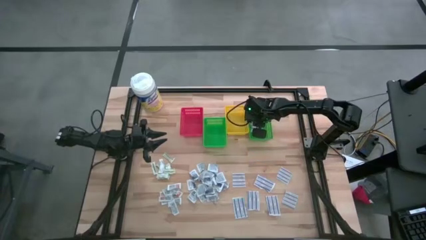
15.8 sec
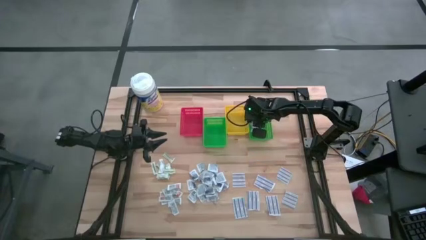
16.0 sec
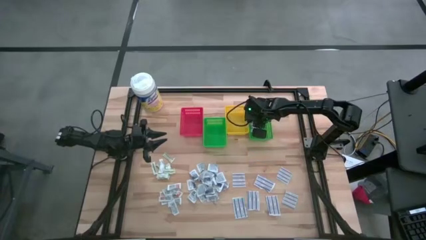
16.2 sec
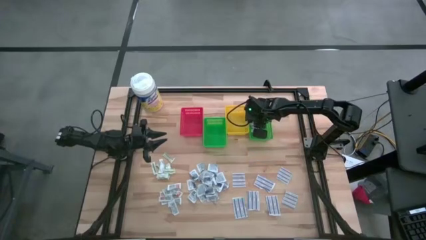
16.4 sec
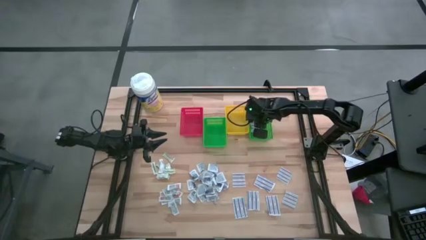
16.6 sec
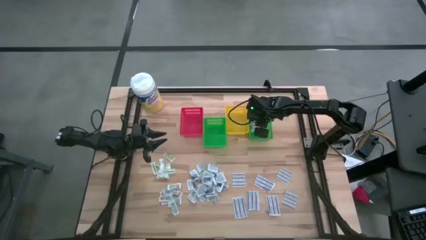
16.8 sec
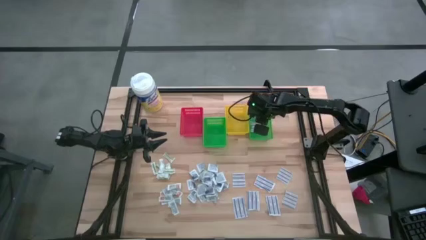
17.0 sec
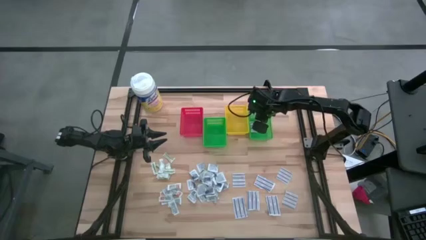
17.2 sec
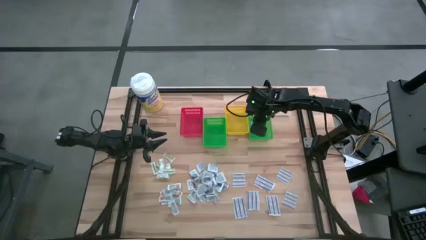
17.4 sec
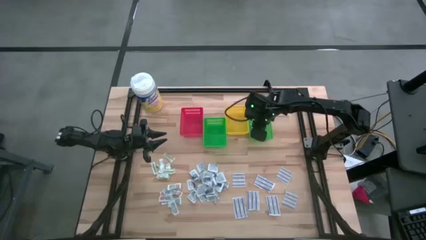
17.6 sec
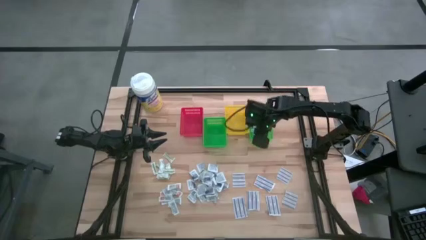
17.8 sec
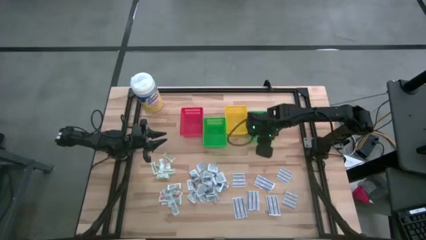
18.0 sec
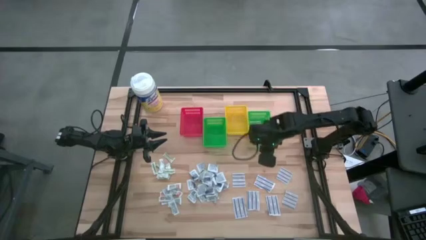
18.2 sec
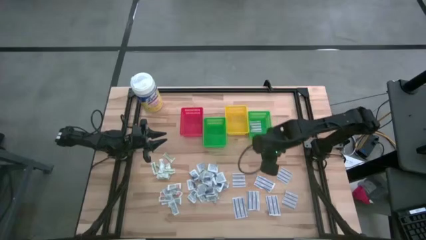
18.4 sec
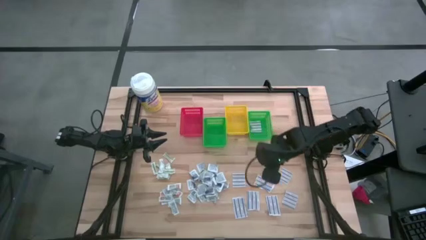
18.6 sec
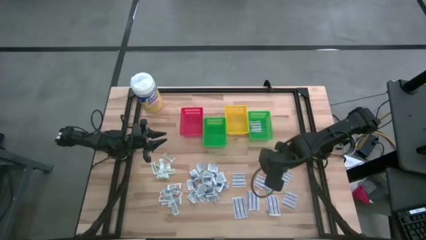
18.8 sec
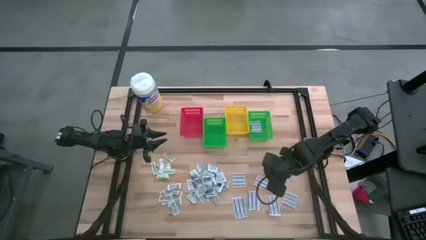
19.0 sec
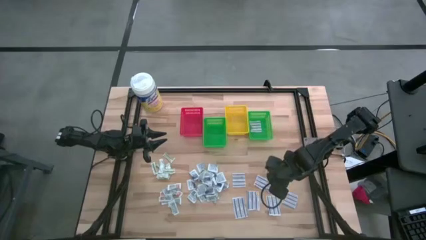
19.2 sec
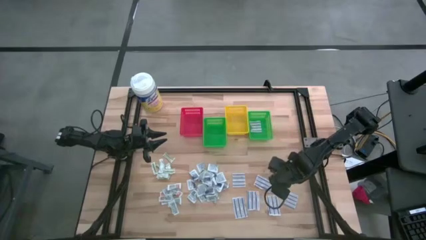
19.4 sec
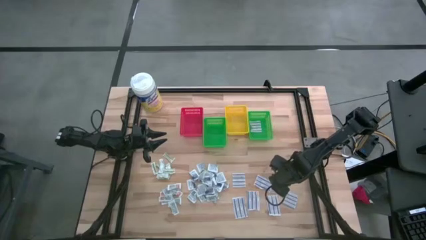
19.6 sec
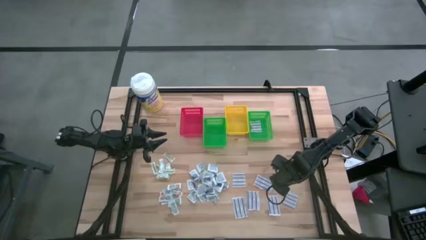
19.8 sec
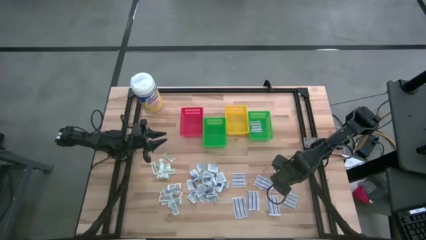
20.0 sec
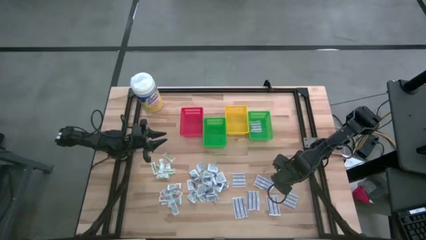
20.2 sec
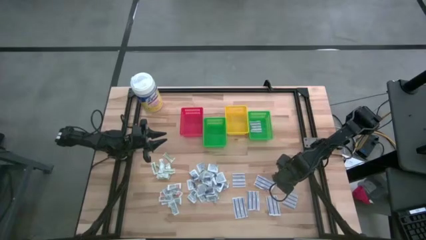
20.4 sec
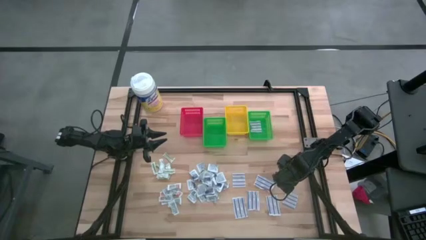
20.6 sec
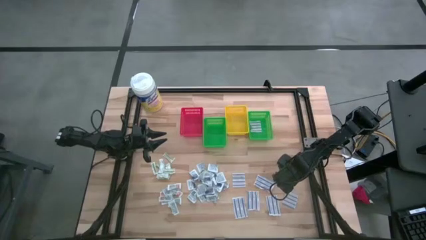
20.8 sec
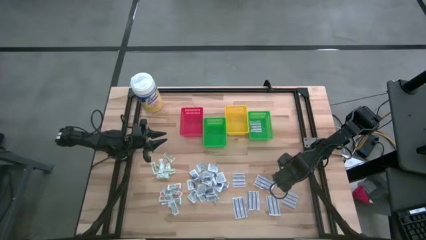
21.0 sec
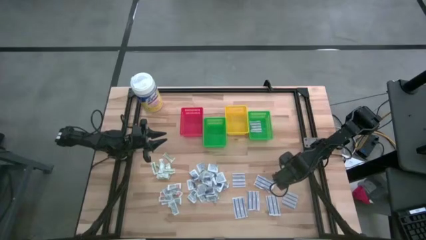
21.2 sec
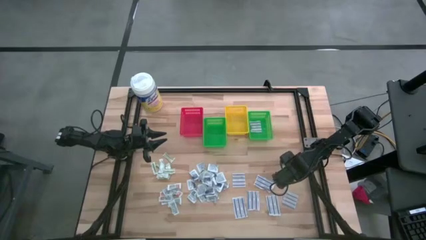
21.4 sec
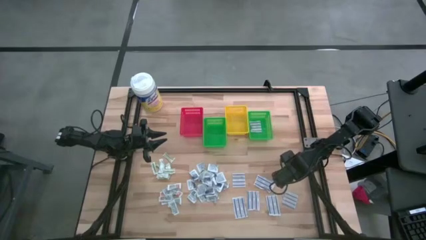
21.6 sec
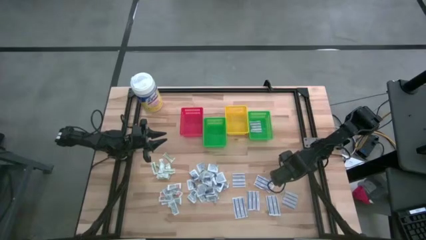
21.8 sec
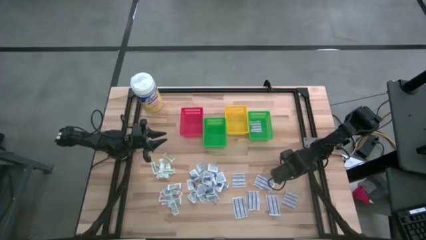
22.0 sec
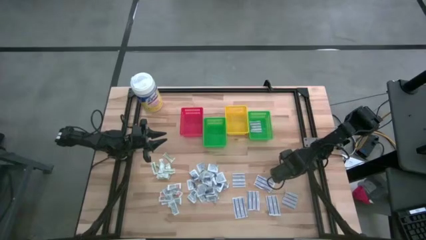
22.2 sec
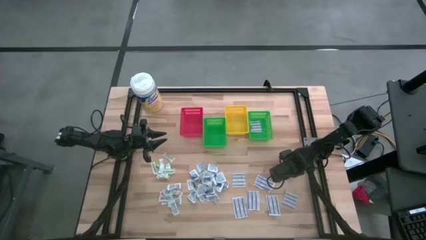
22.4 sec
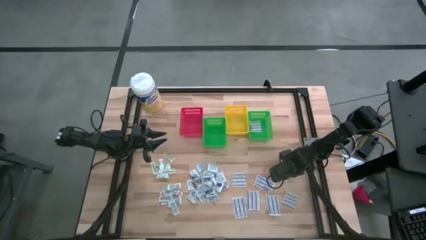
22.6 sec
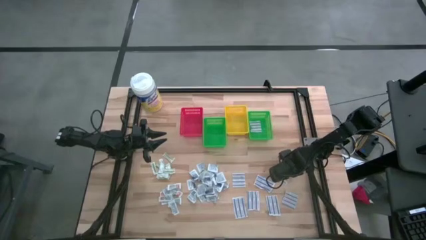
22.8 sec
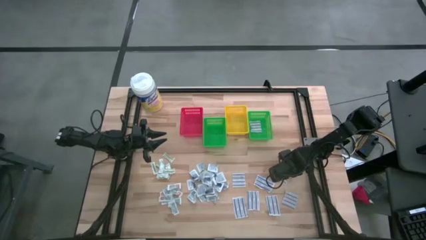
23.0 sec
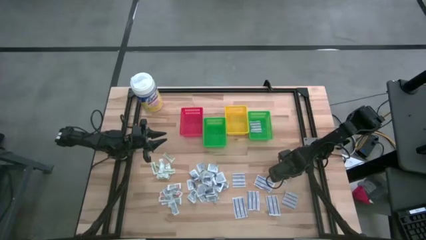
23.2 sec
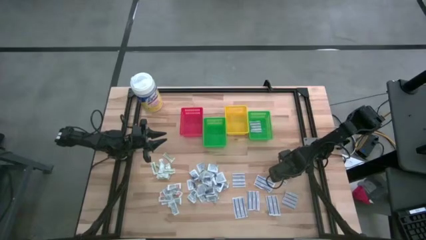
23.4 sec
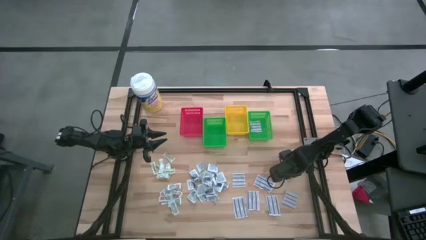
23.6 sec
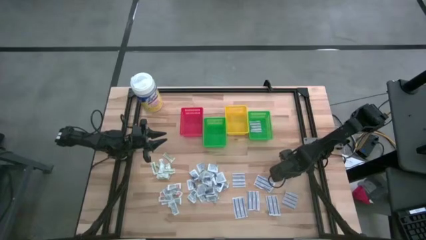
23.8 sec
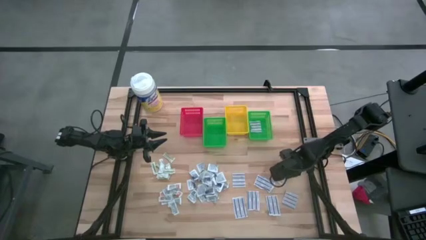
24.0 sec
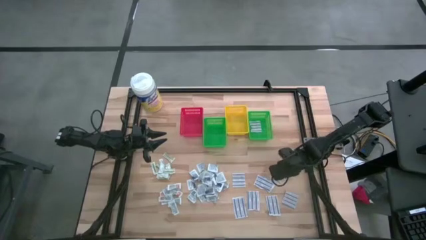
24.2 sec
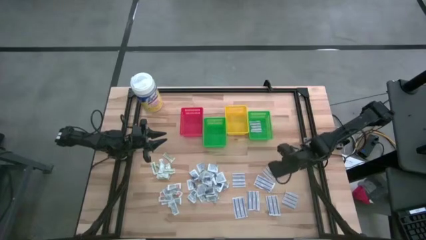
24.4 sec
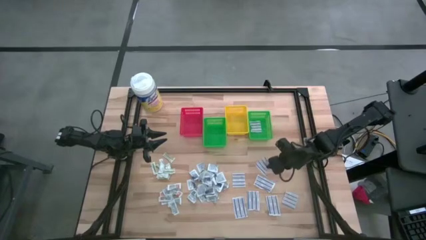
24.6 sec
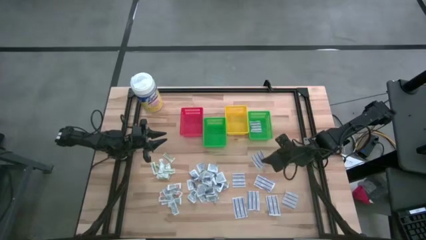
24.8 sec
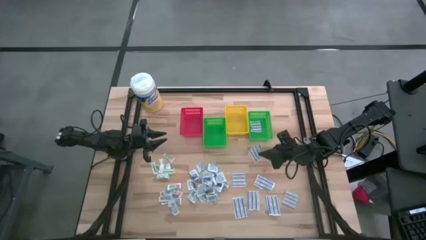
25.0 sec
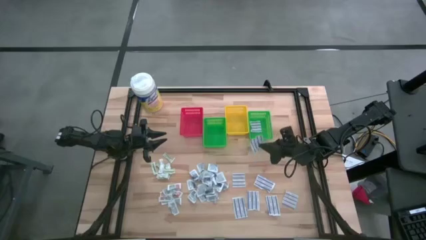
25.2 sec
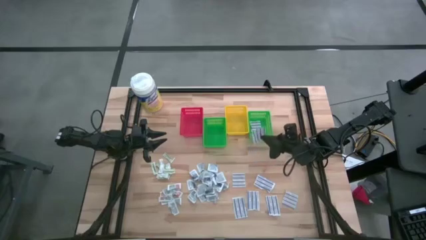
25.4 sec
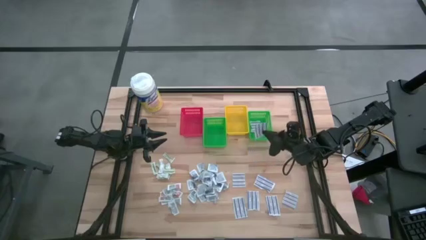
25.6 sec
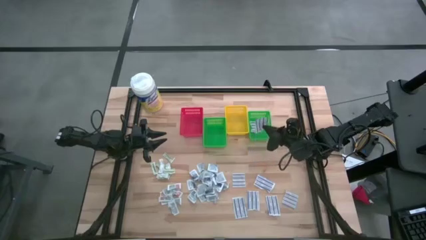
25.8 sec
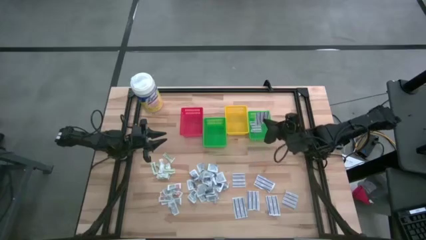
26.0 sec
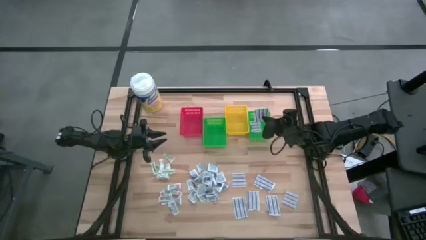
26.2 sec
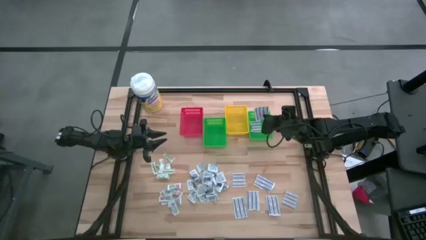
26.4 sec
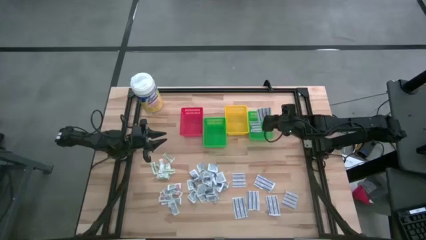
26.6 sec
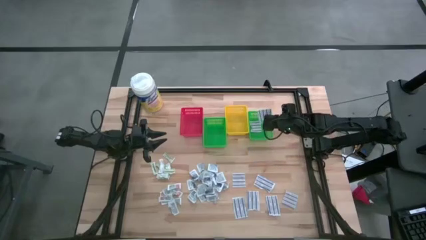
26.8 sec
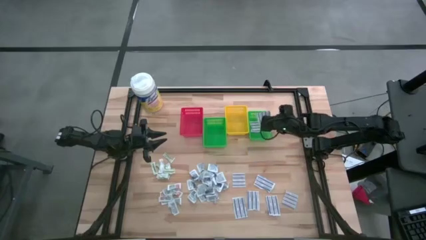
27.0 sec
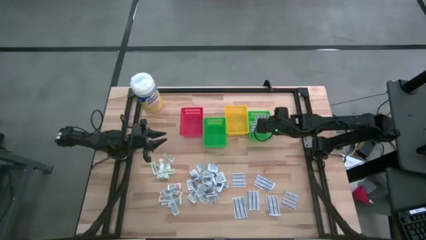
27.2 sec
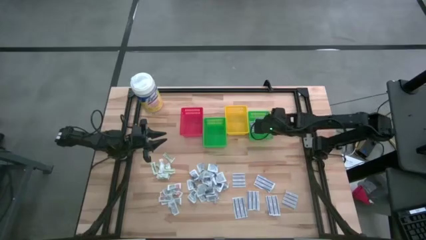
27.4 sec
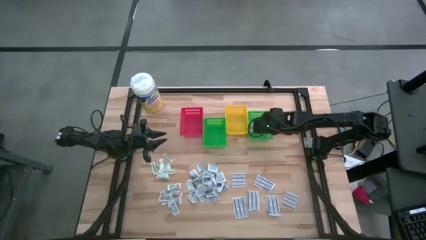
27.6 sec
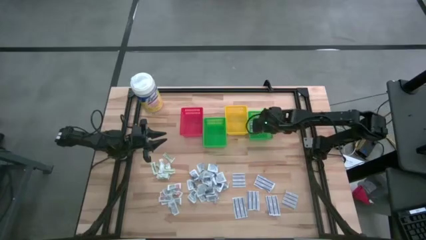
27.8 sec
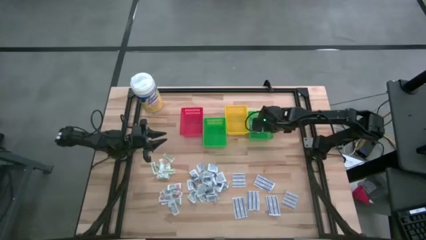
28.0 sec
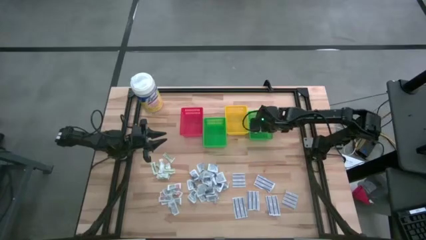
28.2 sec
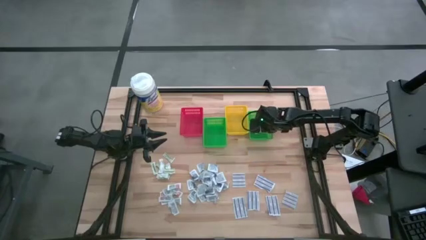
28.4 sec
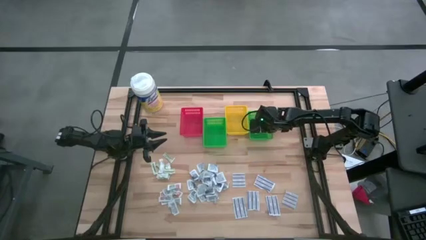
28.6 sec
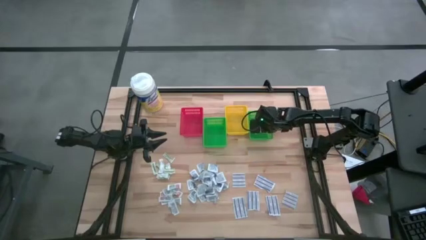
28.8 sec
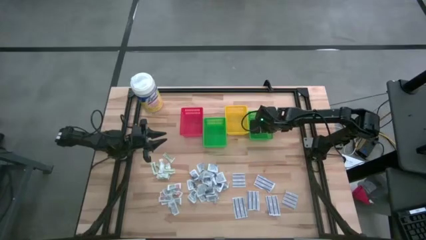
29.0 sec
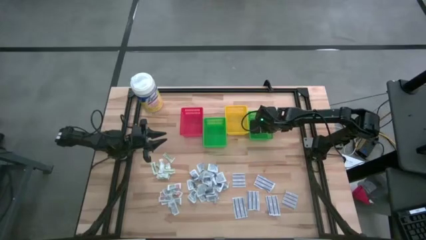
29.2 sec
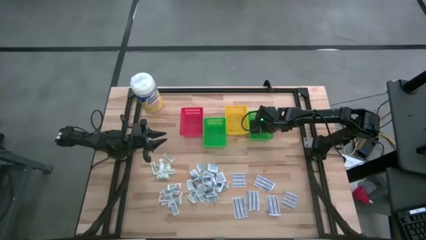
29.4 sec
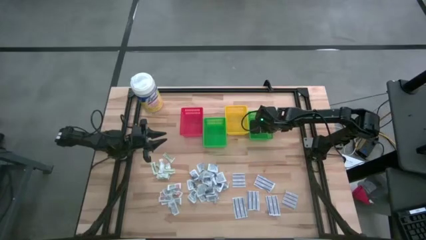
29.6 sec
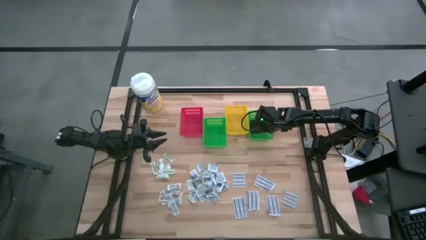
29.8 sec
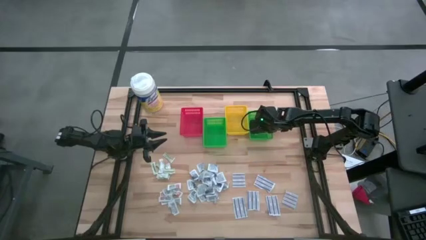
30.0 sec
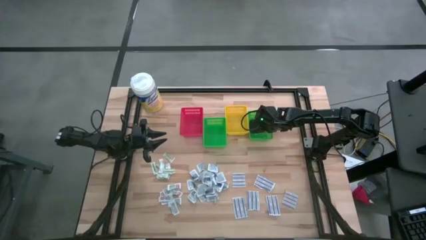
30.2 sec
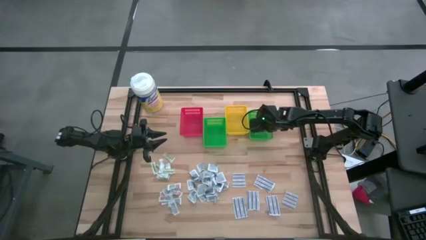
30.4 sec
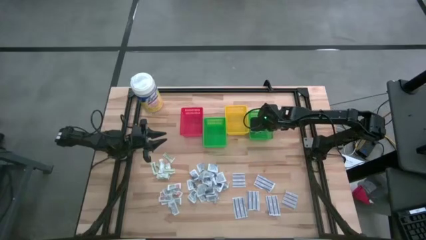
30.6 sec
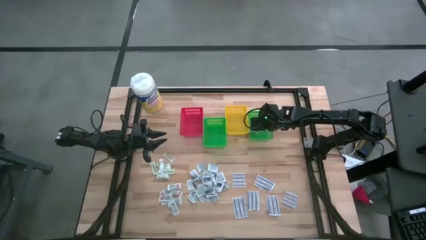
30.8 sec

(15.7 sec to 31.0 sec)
Task: Pick & Place First Aid Supplies
Put the blue bandage into the right green basket

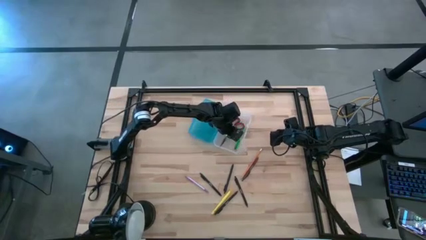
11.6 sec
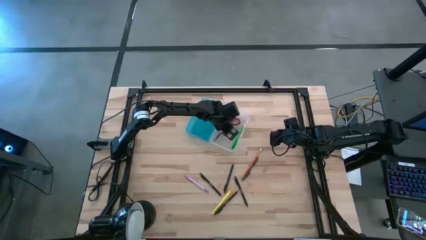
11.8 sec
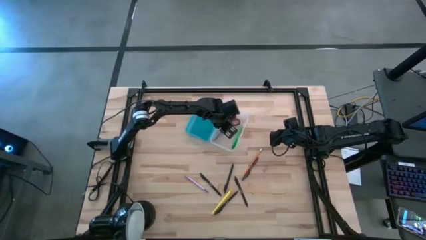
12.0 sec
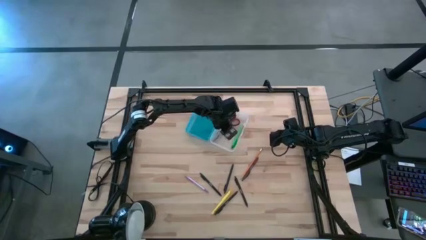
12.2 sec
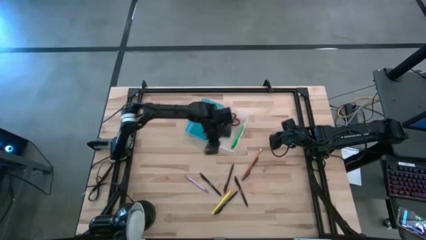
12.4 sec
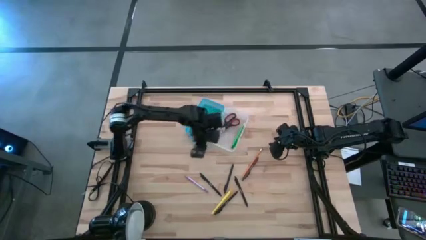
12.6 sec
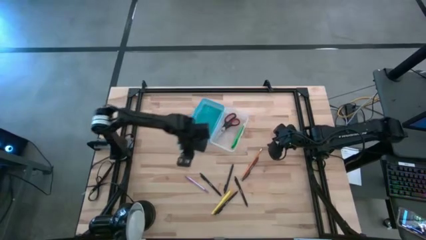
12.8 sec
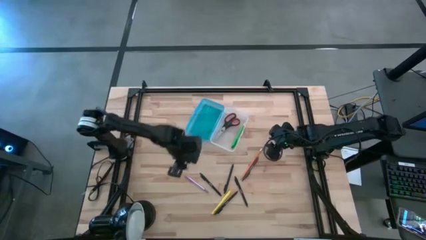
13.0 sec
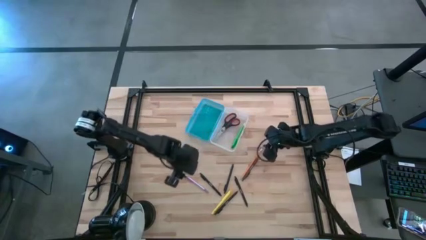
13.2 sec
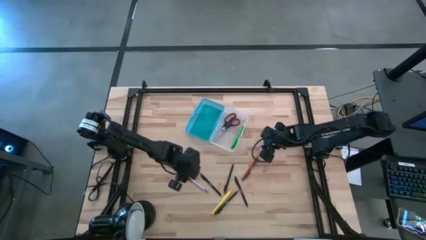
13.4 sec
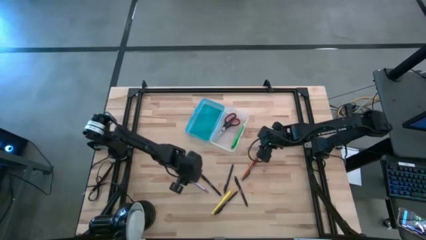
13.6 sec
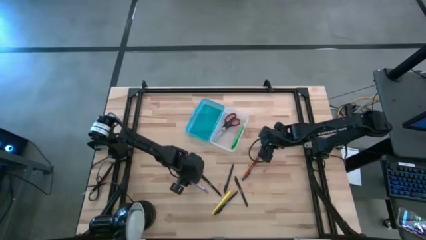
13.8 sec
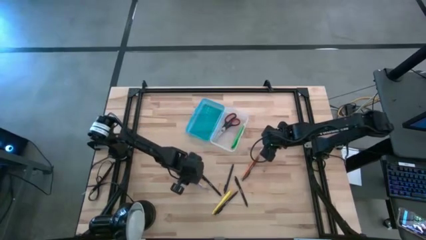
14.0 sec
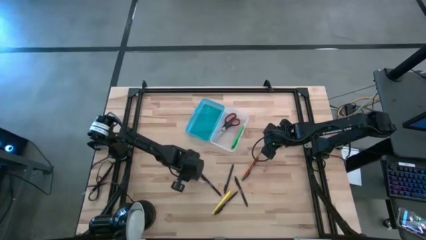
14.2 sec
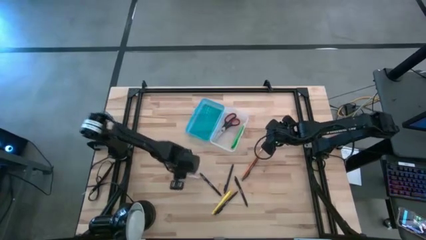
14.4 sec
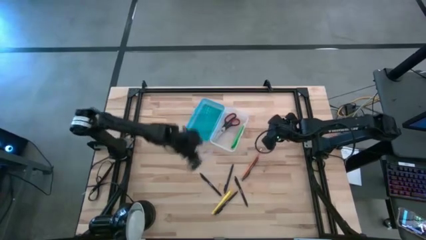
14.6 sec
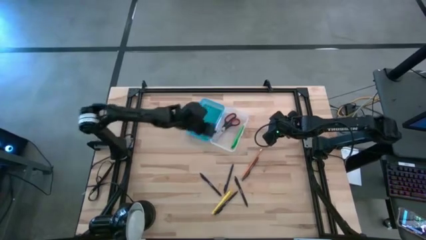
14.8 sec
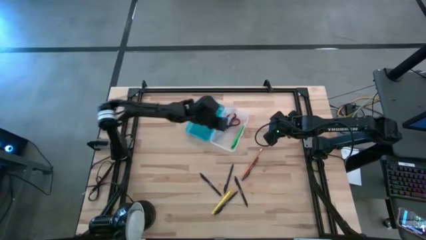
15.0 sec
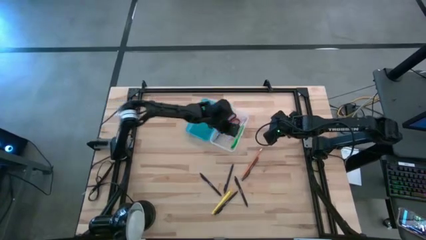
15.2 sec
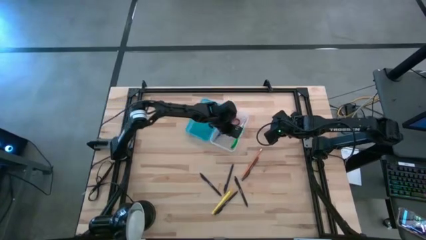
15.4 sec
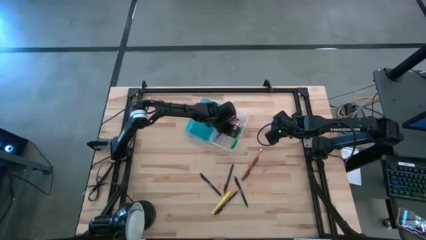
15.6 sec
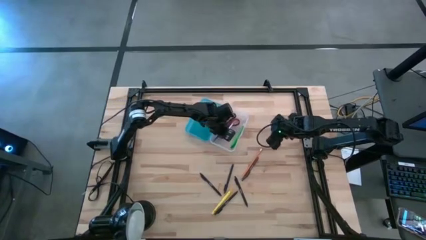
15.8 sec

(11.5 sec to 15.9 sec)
Task: Pick & place school supplies into a supply box
Put the violet pen into the blue supply box
